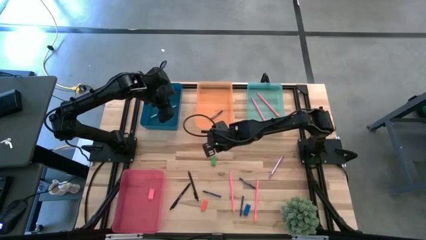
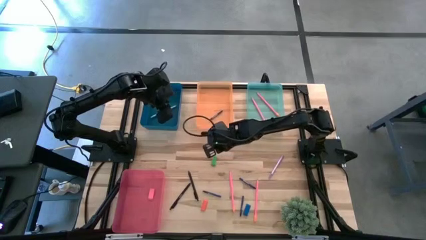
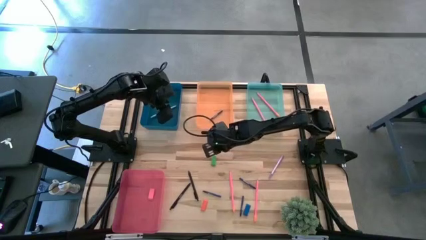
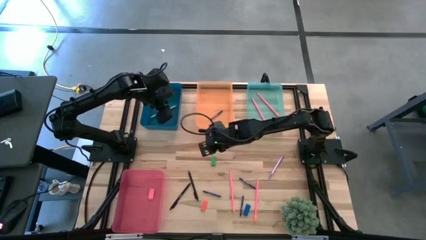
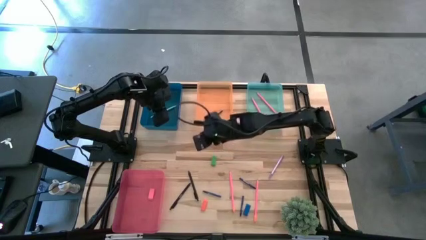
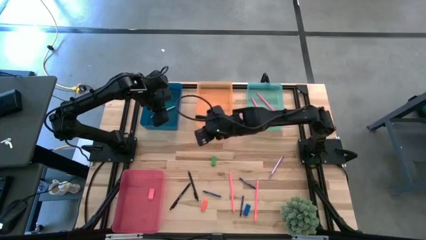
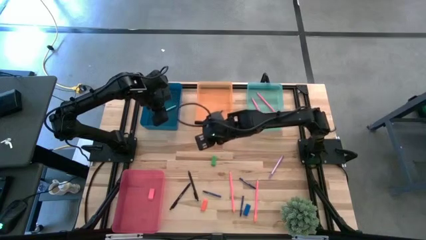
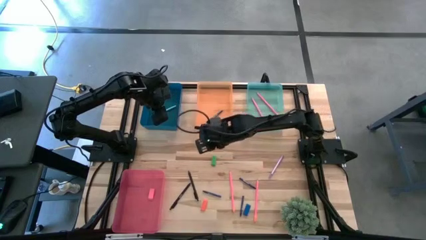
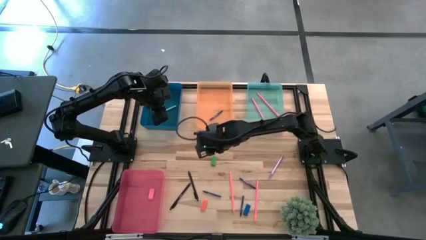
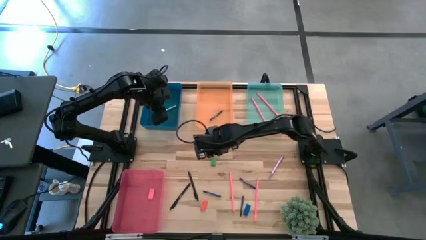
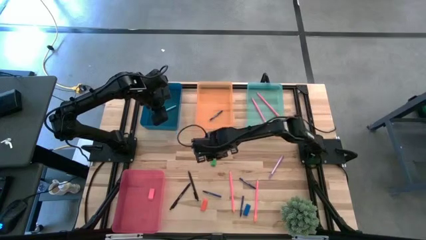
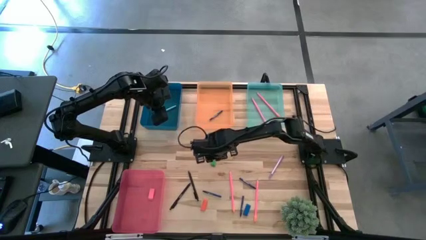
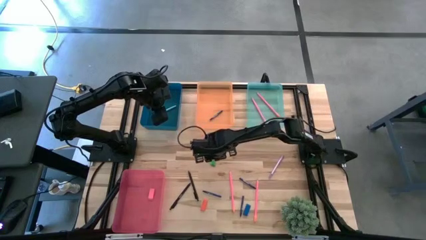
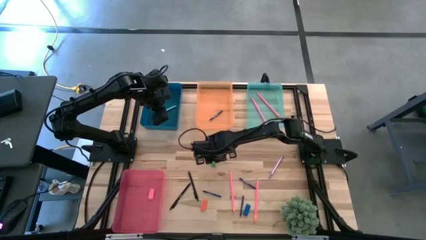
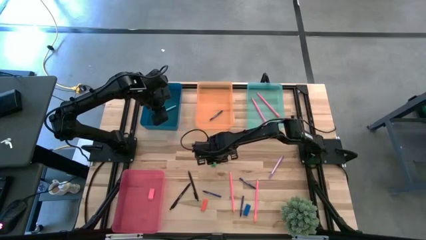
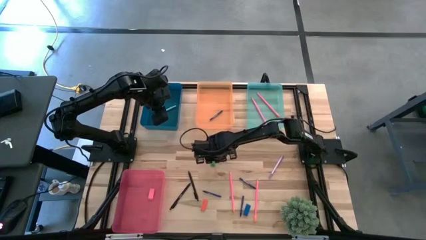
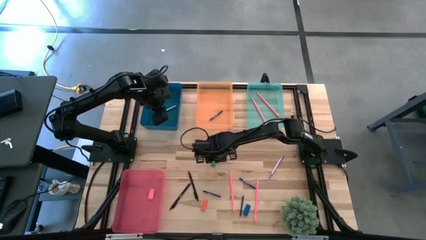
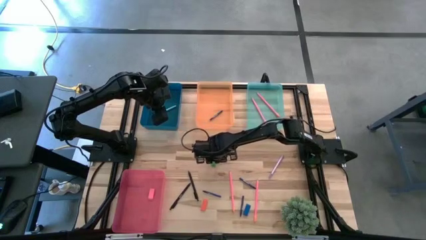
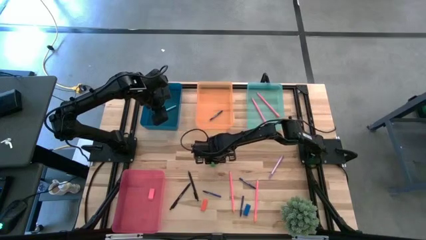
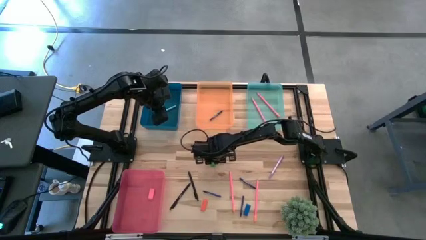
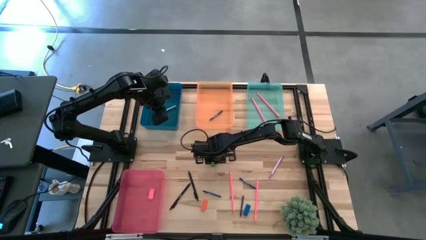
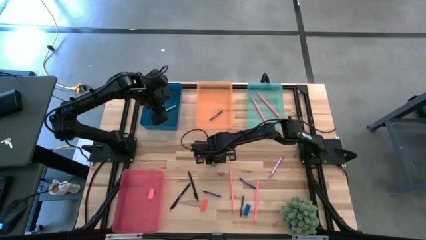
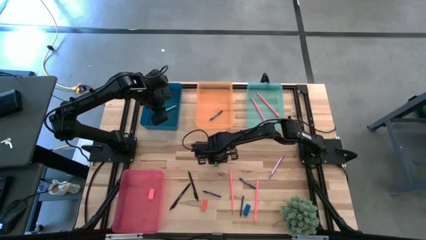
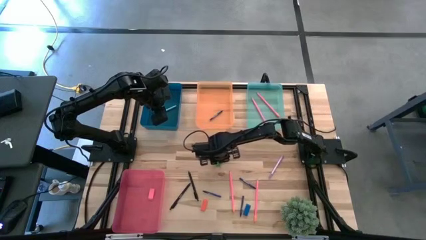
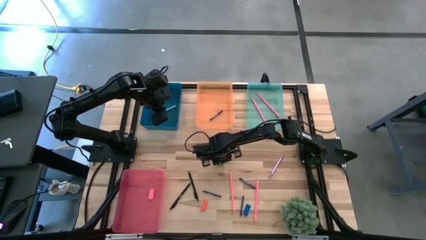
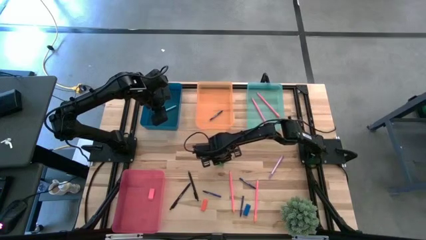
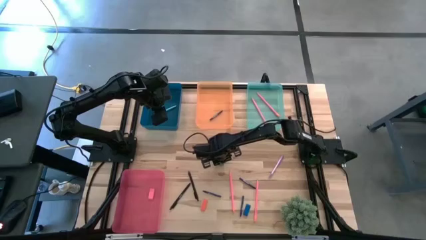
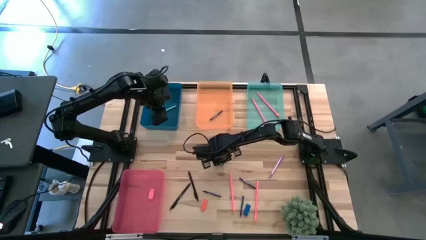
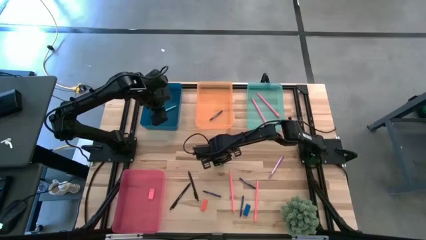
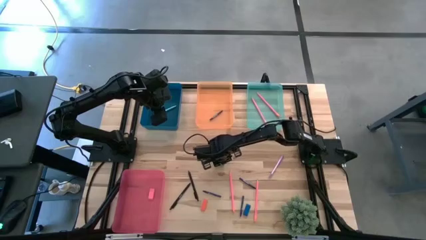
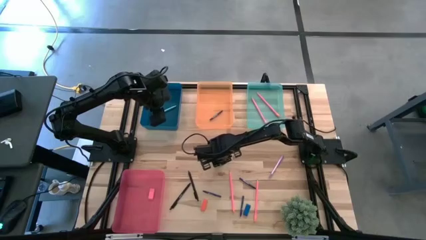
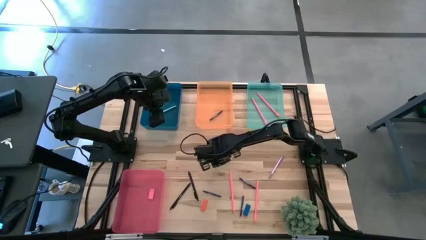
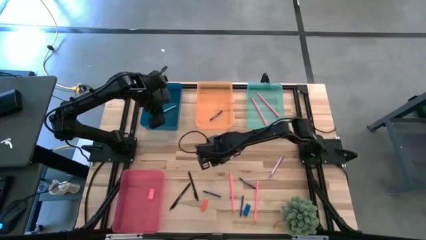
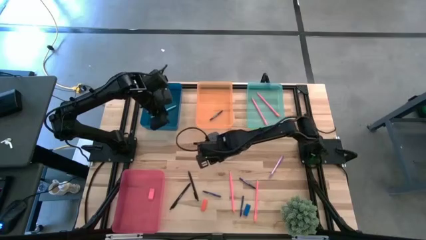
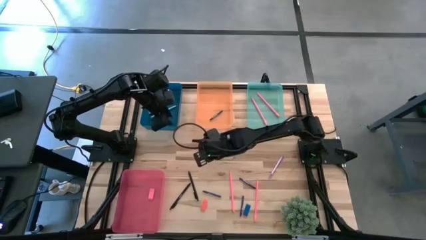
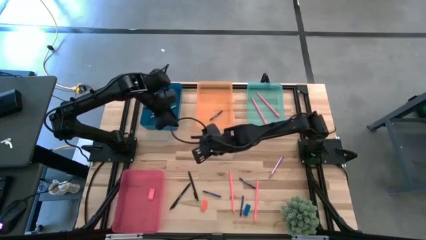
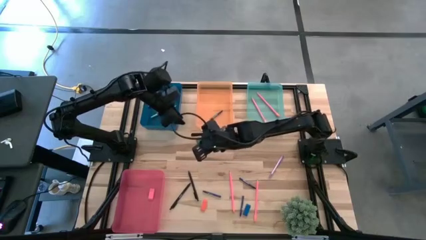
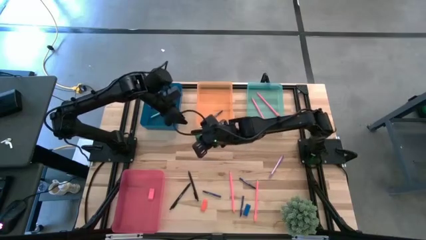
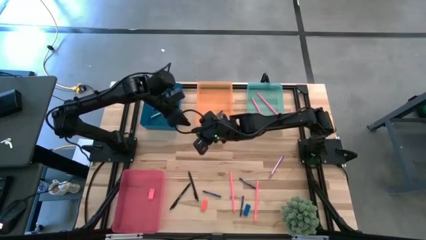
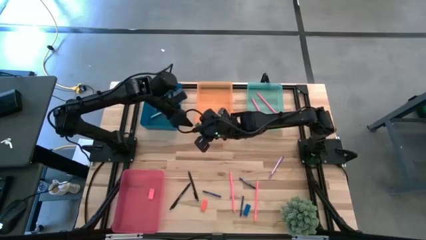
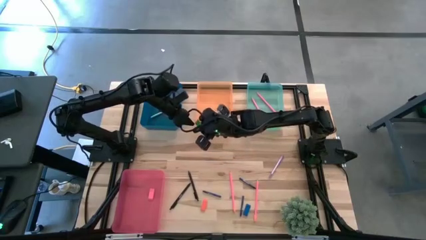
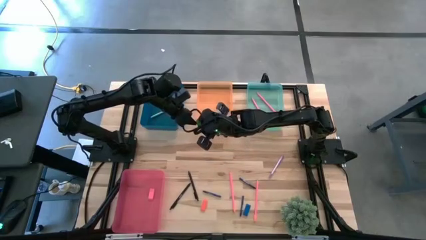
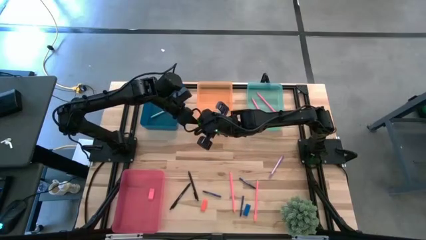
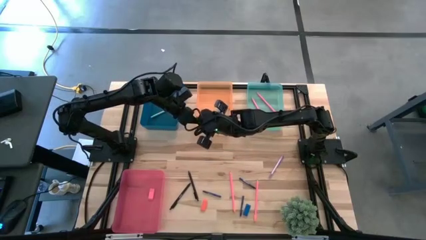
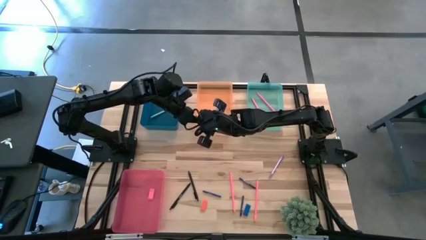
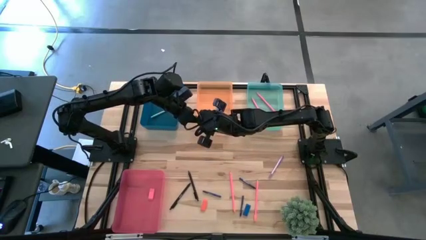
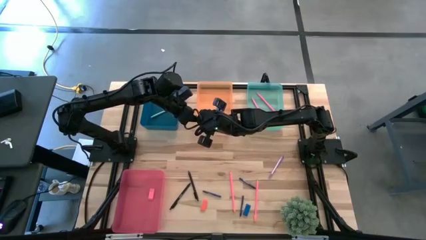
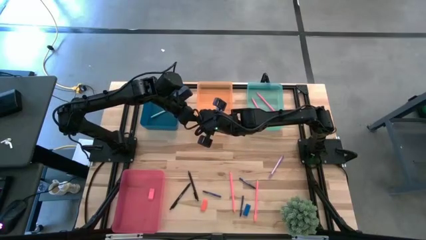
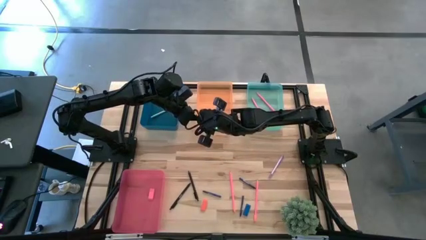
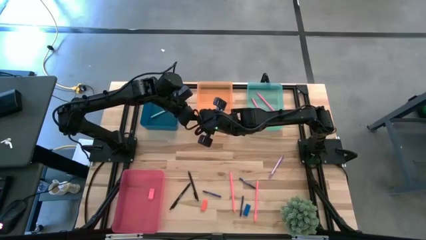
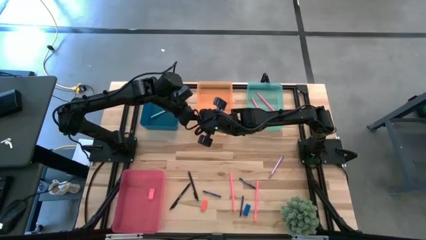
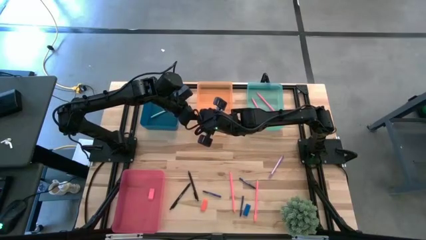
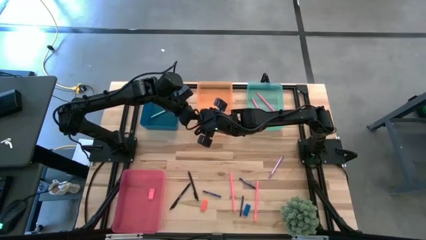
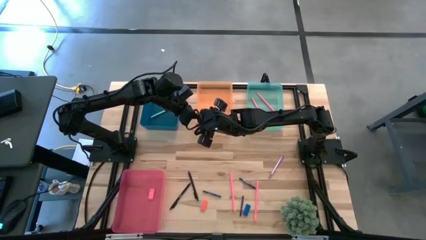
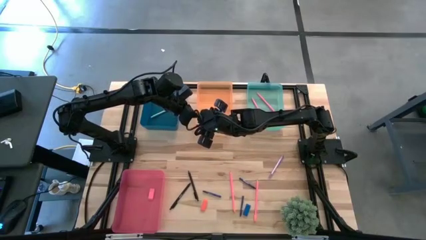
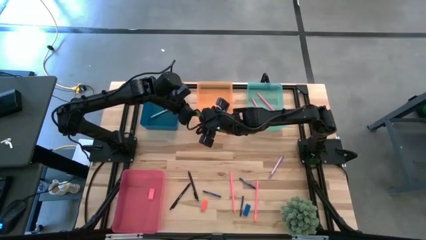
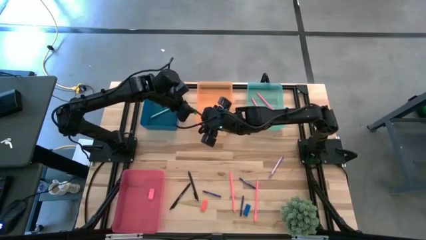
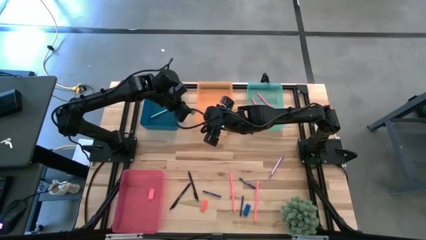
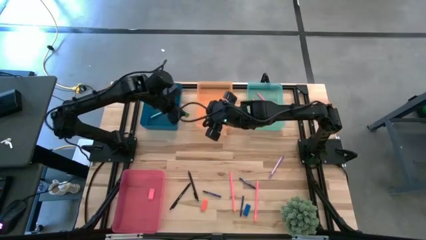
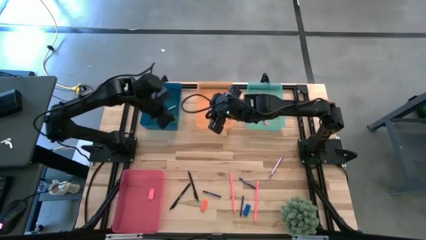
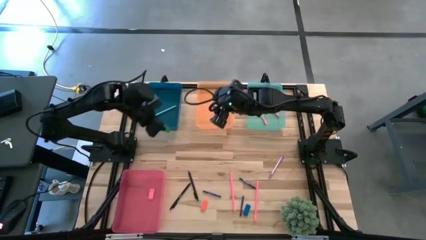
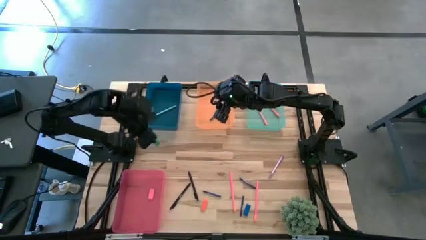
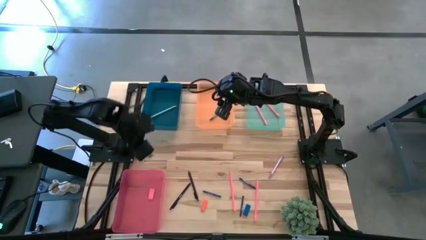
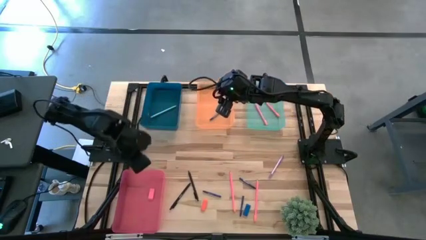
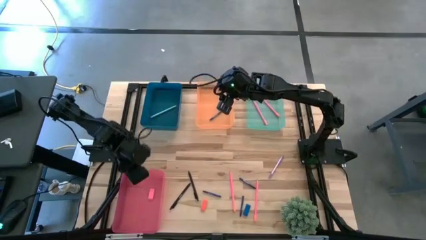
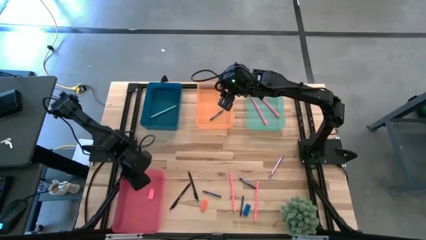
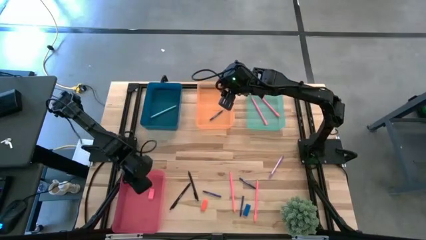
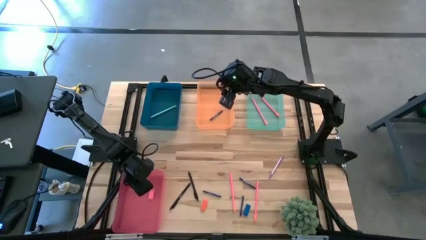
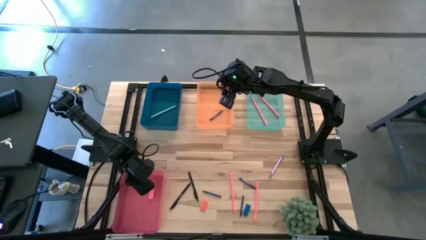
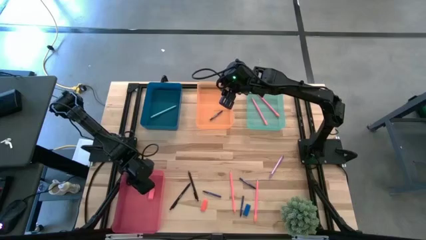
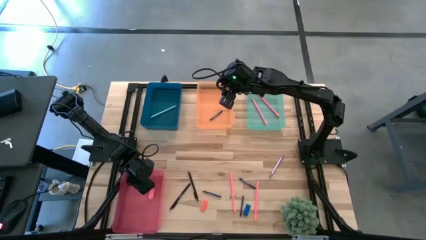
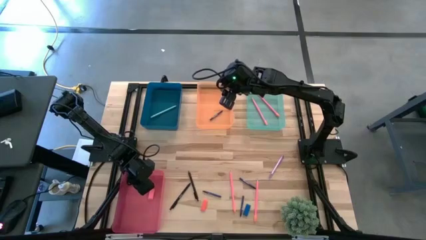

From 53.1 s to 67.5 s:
Task: Sort crayons/erasers/pens/pencils in bins
Put the green eraser into the pink bin
